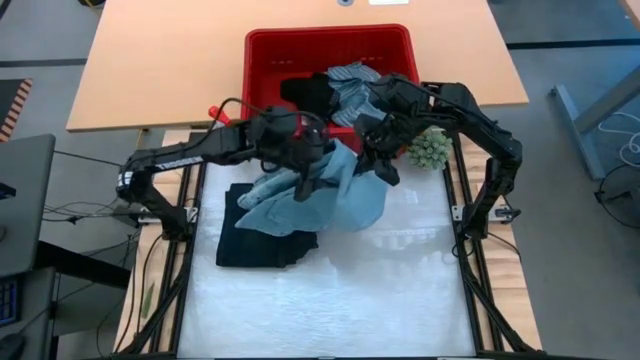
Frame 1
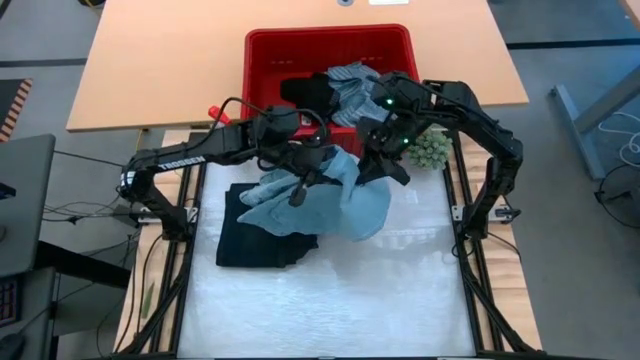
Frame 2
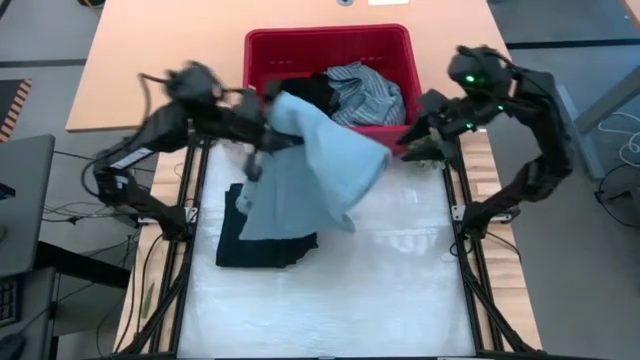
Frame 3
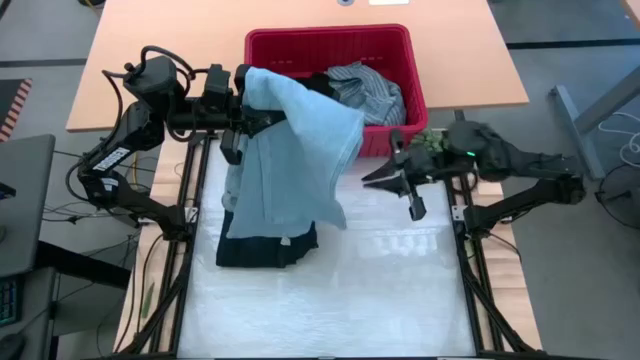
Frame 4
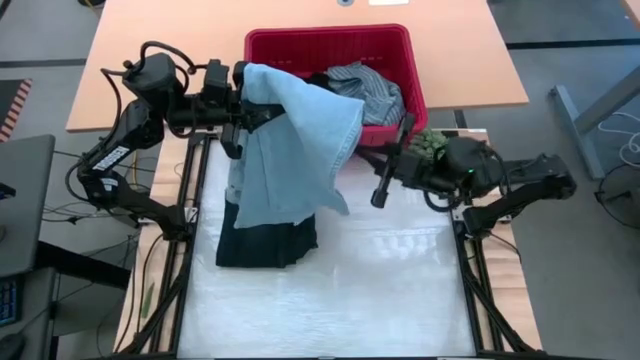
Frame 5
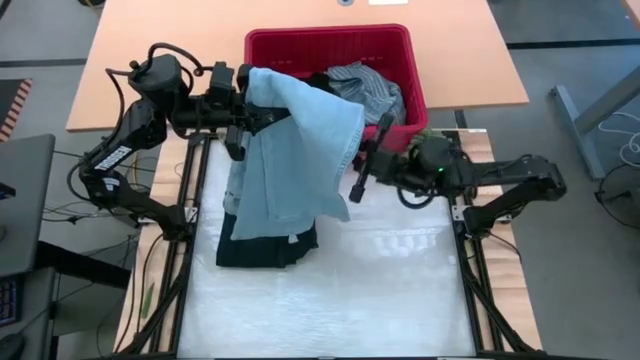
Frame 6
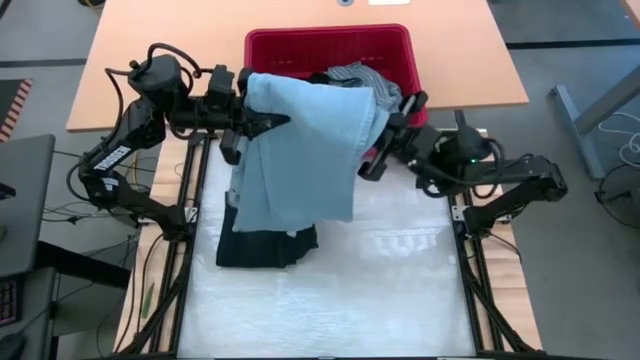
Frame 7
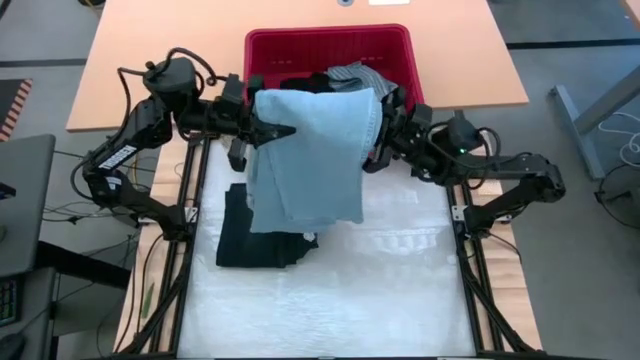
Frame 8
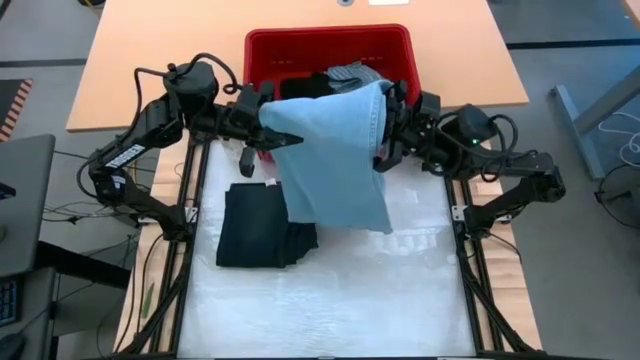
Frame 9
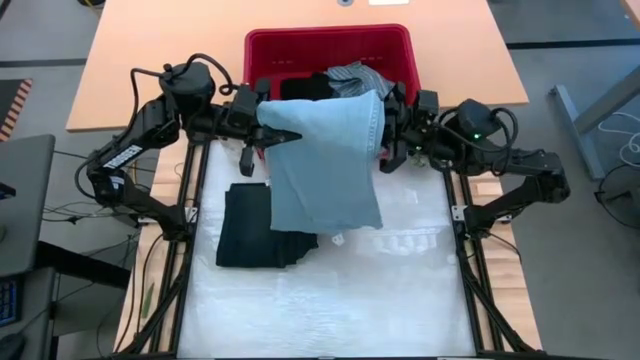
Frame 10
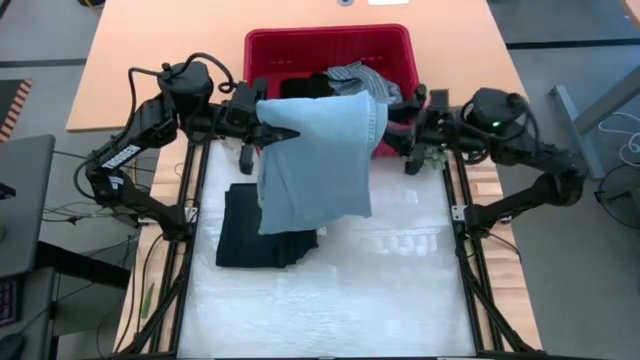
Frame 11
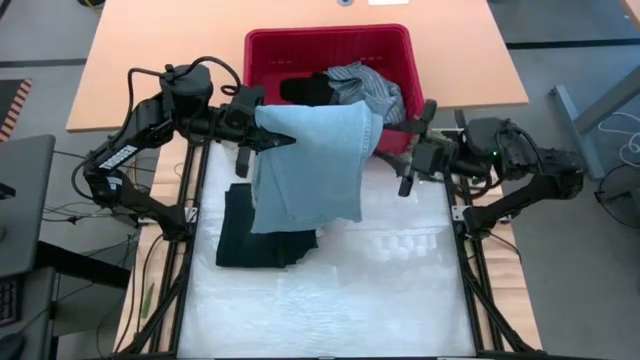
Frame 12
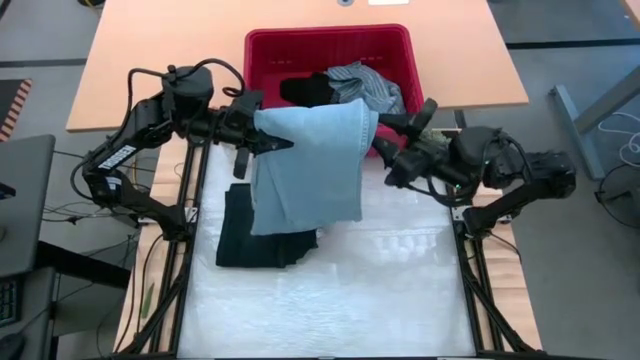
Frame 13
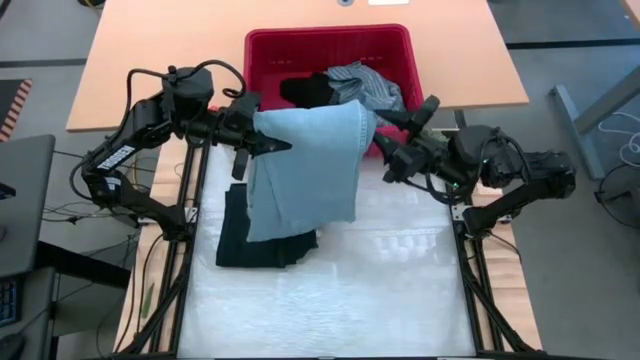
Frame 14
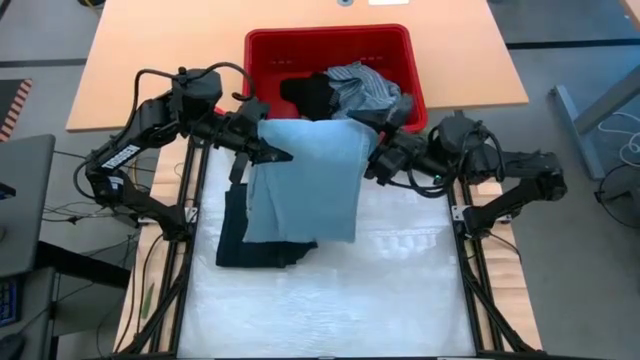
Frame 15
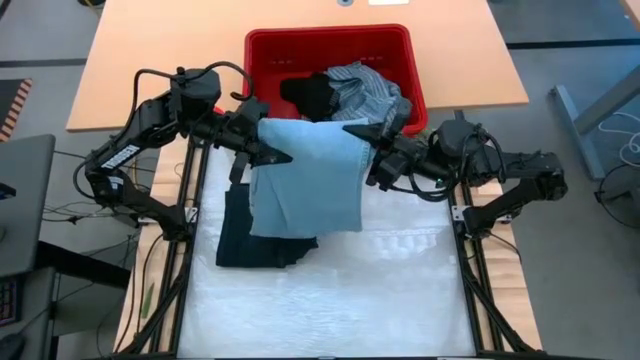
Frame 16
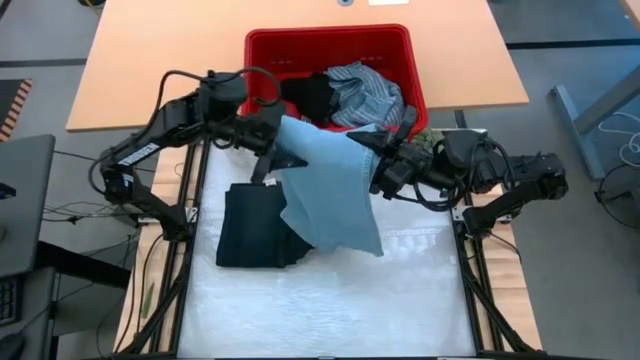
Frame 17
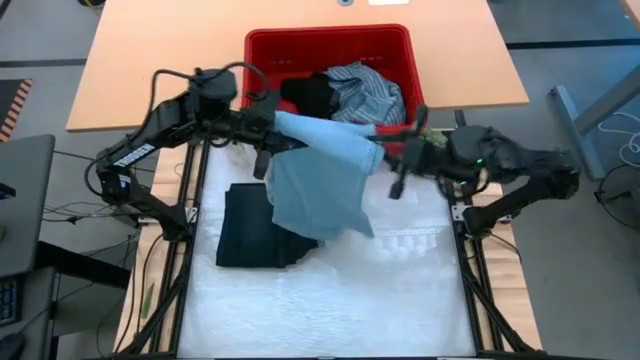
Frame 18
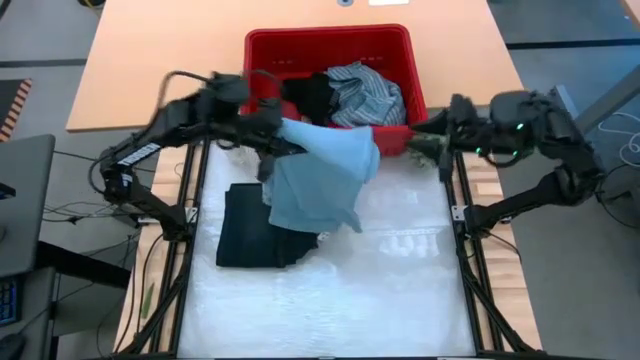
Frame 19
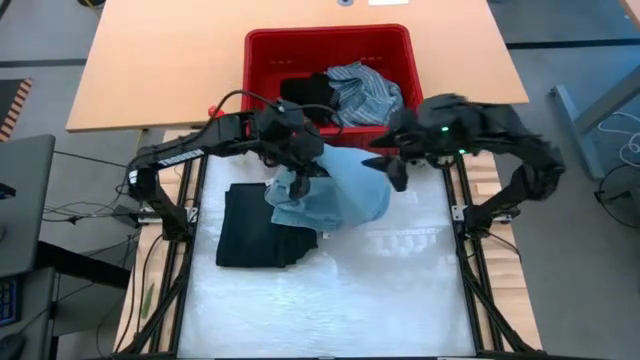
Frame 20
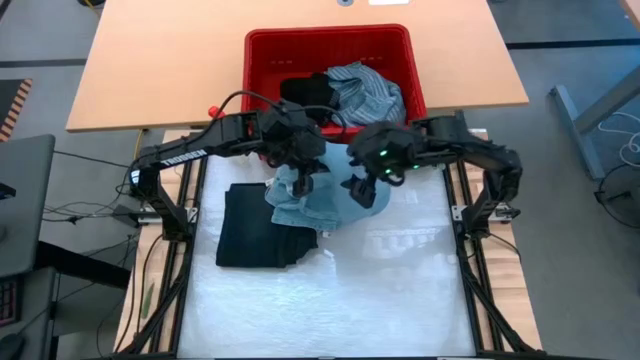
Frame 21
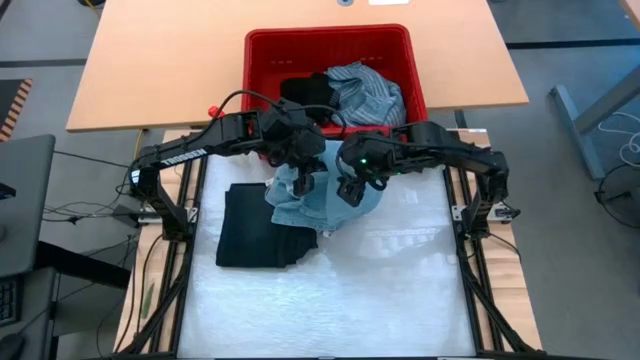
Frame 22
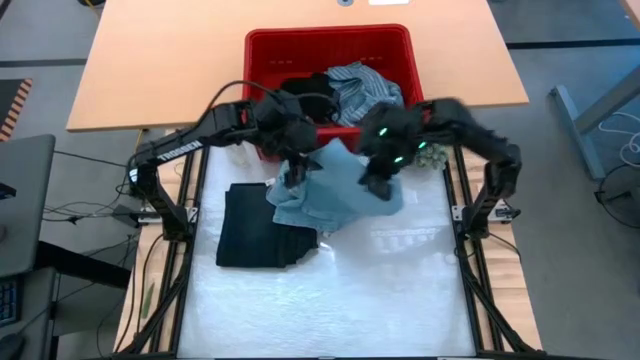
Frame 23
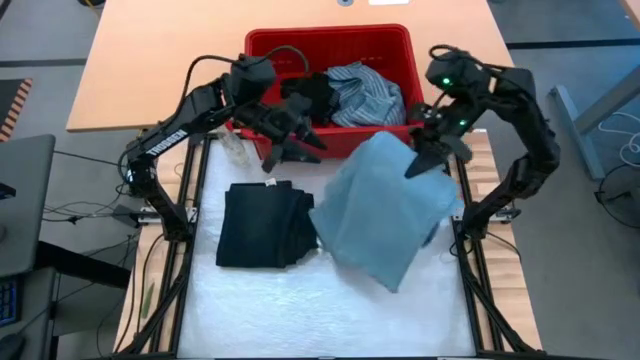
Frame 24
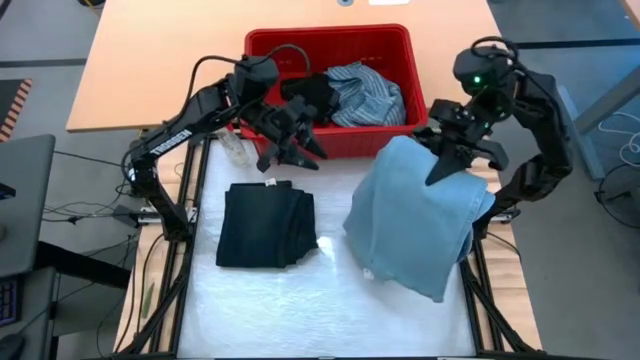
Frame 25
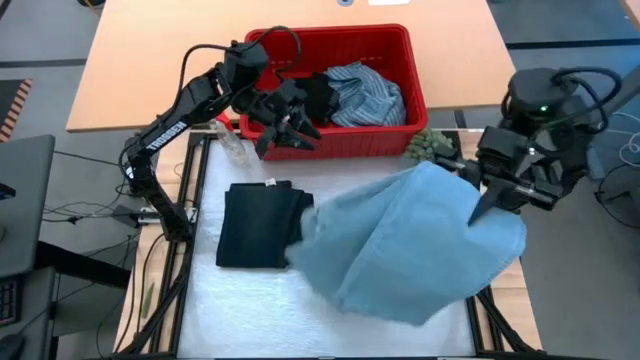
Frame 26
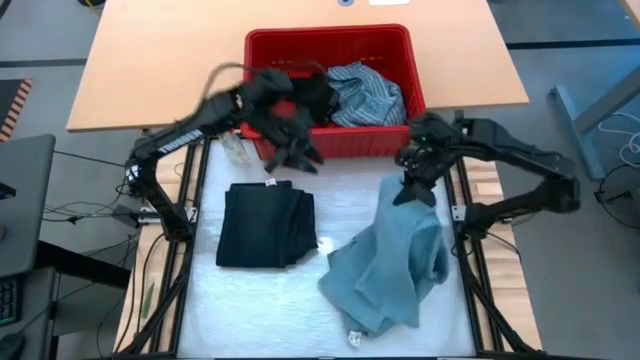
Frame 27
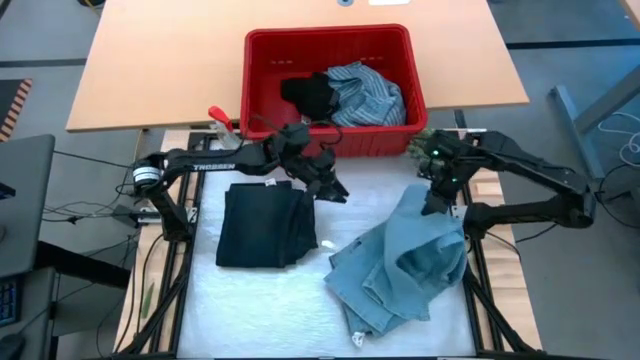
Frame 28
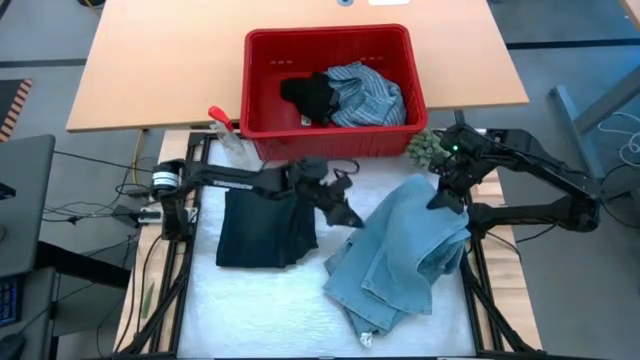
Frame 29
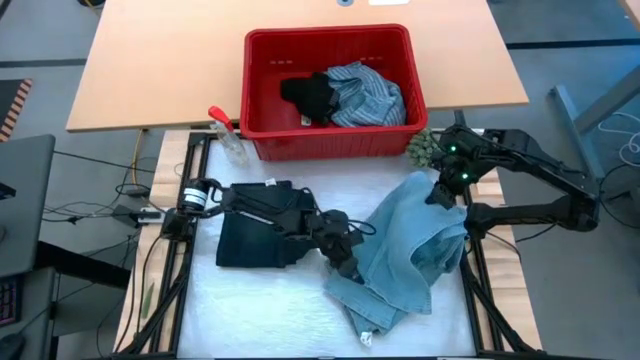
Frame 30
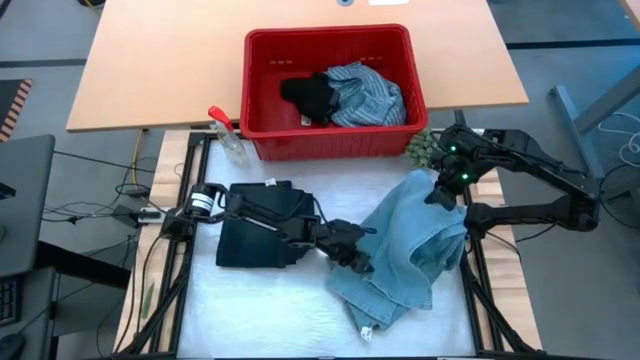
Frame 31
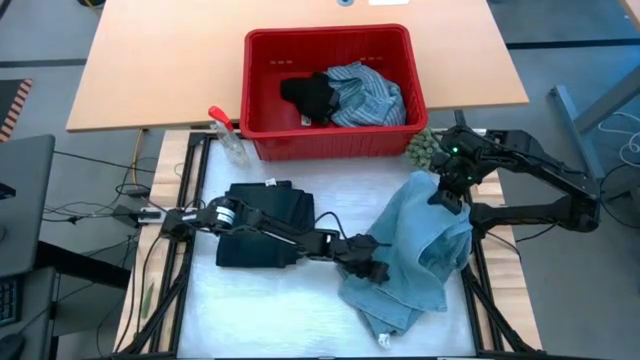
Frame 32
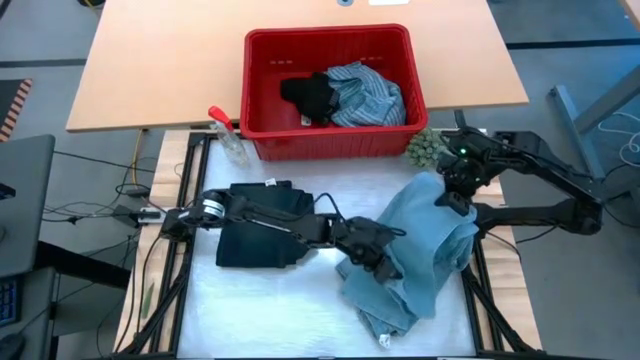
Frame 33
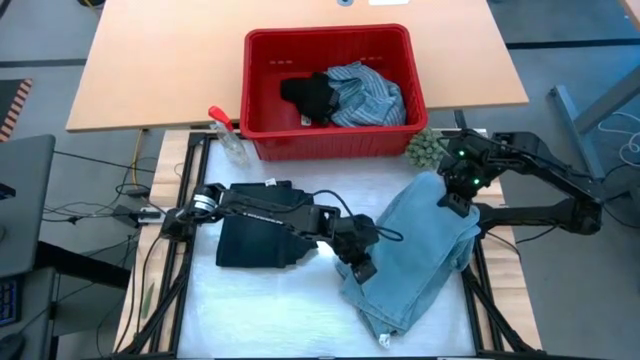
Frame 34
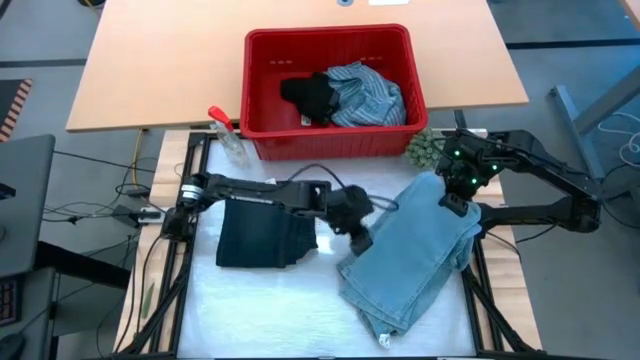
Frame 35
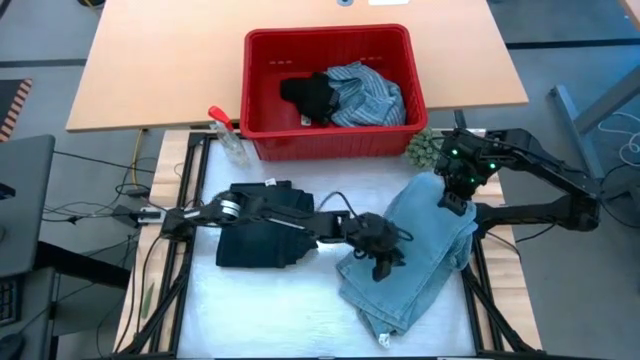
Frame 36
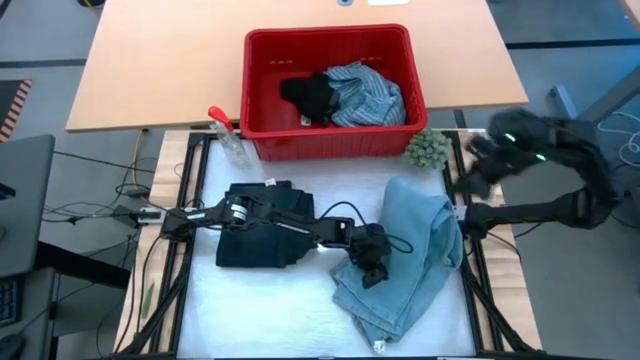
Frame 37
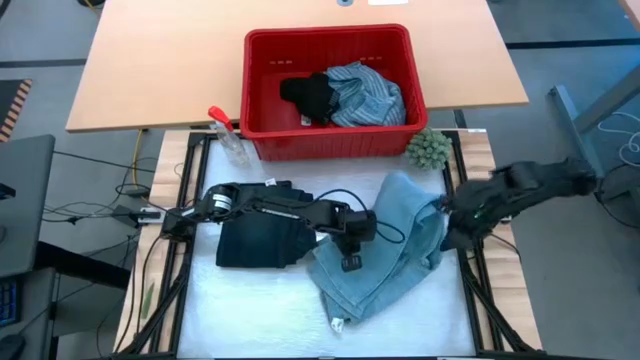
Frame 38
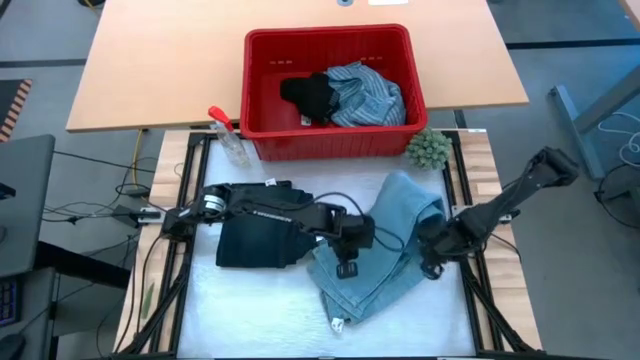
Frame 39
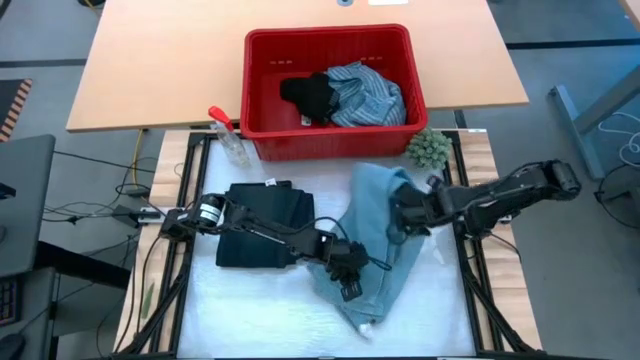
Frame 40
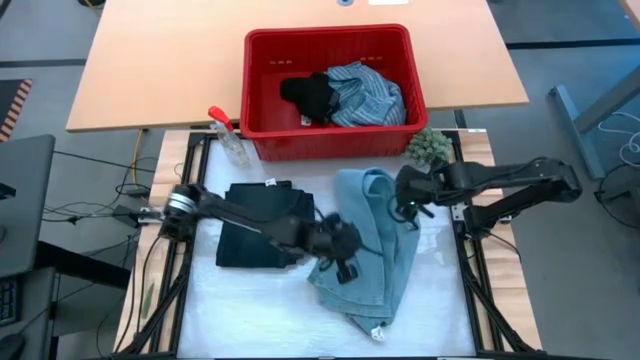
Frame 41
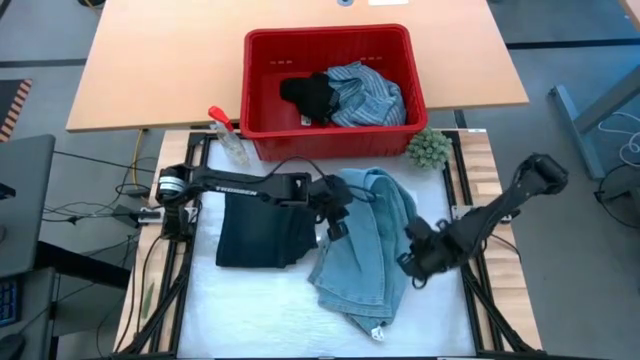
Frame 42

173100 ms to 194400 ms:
Task: Fold Laundry from Bin
Fold the light blue pants
